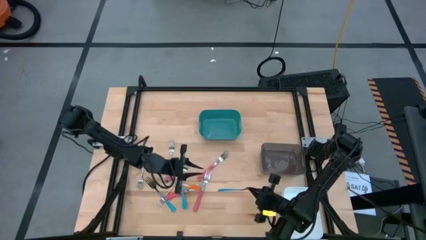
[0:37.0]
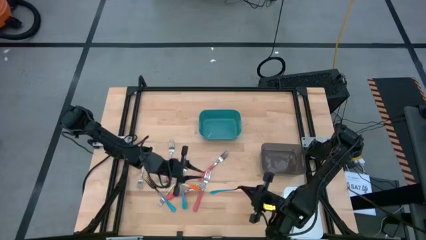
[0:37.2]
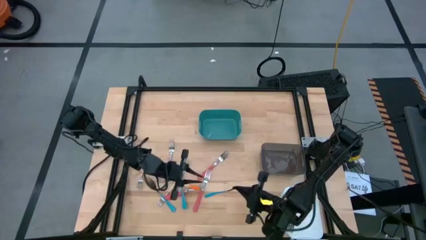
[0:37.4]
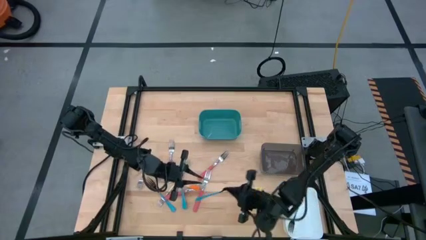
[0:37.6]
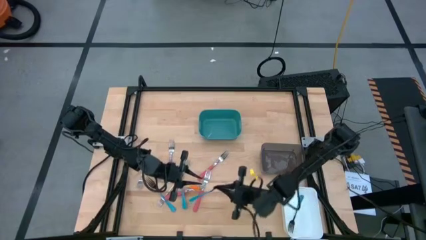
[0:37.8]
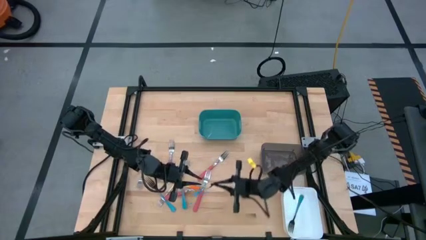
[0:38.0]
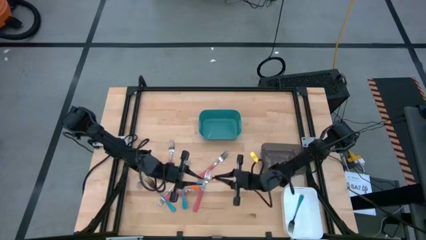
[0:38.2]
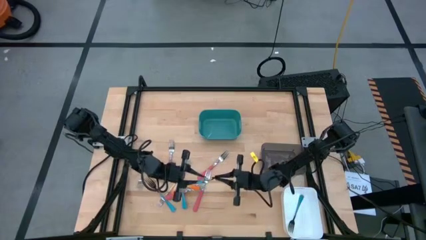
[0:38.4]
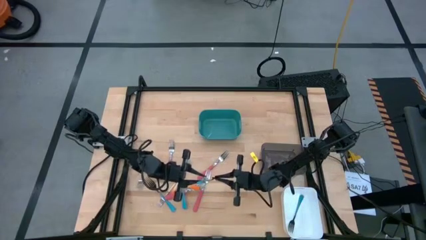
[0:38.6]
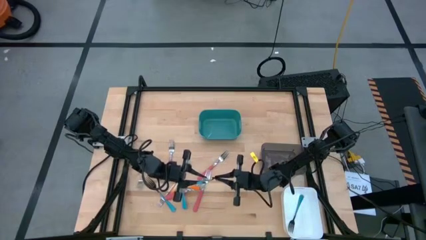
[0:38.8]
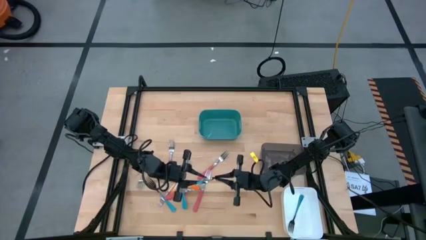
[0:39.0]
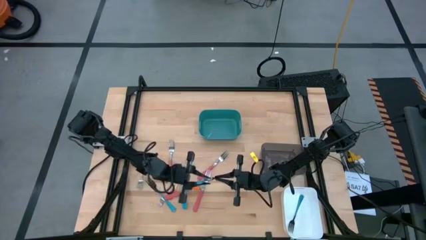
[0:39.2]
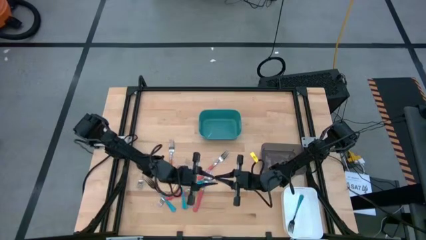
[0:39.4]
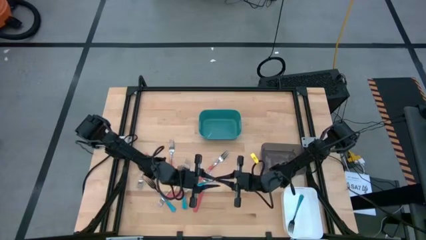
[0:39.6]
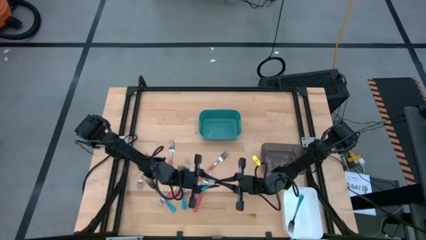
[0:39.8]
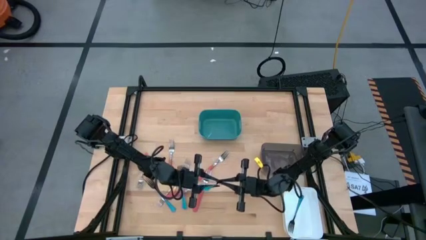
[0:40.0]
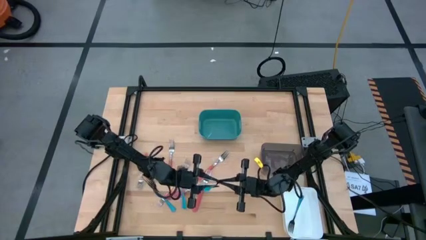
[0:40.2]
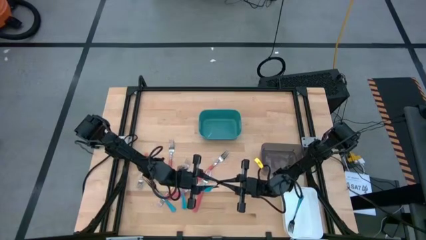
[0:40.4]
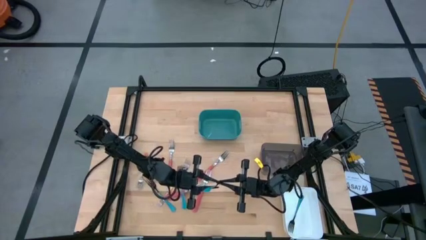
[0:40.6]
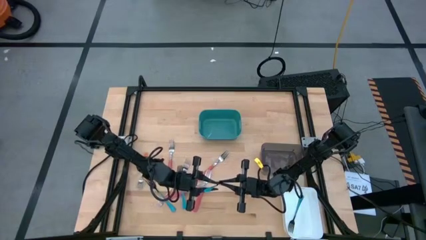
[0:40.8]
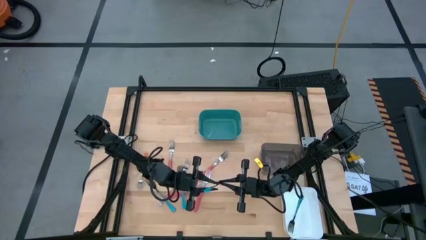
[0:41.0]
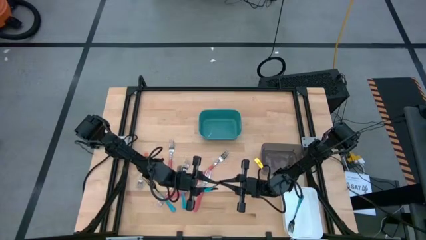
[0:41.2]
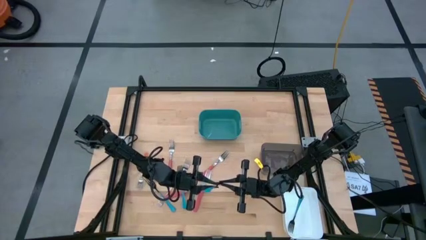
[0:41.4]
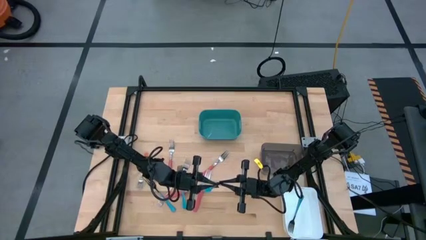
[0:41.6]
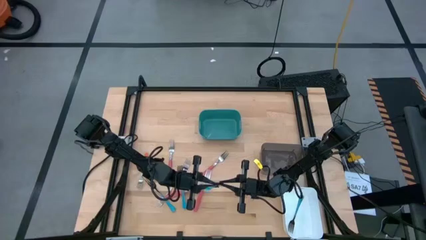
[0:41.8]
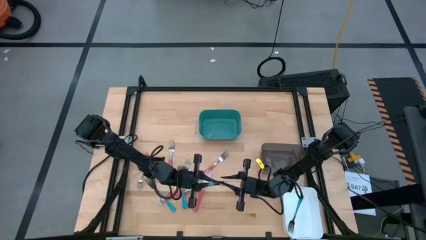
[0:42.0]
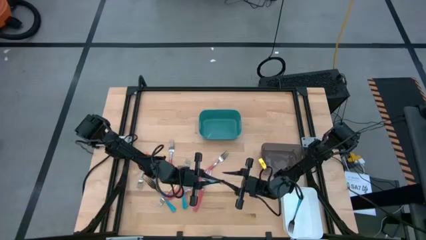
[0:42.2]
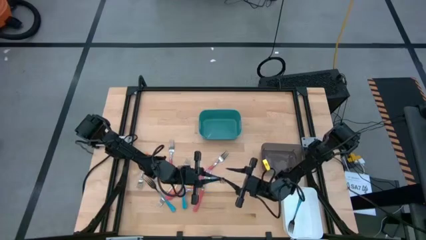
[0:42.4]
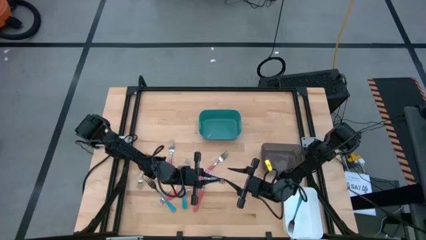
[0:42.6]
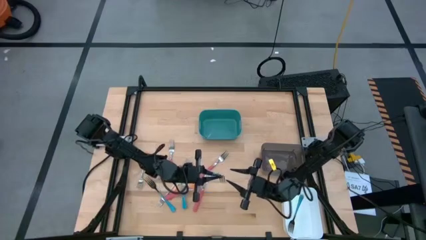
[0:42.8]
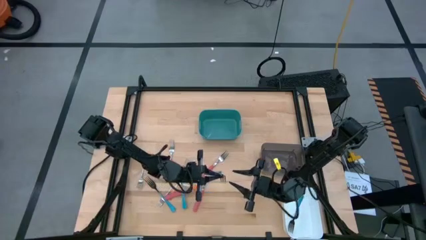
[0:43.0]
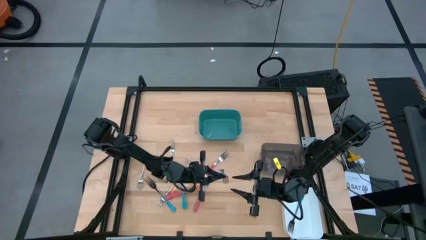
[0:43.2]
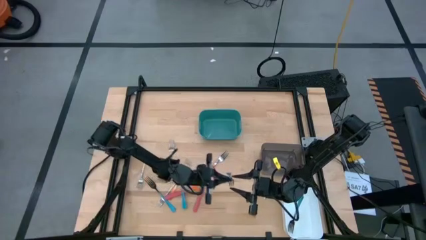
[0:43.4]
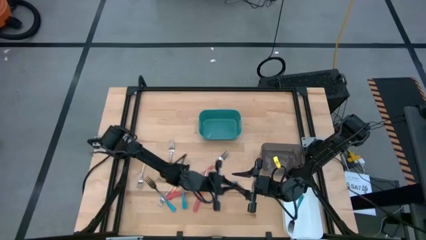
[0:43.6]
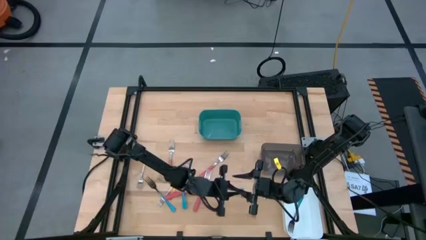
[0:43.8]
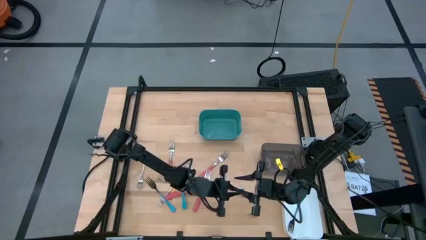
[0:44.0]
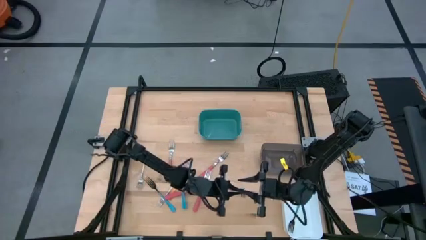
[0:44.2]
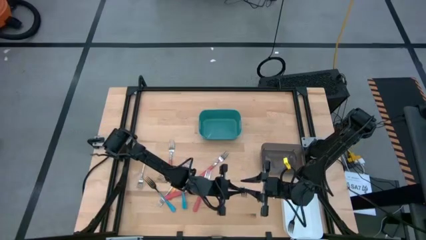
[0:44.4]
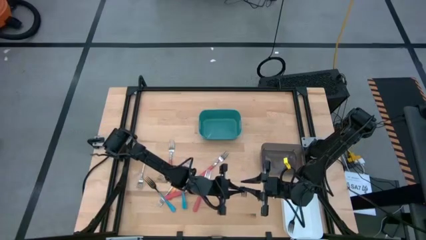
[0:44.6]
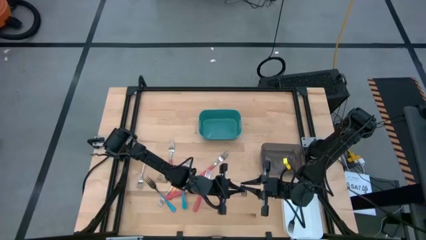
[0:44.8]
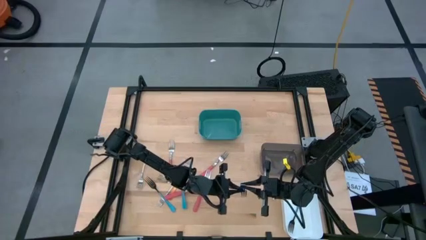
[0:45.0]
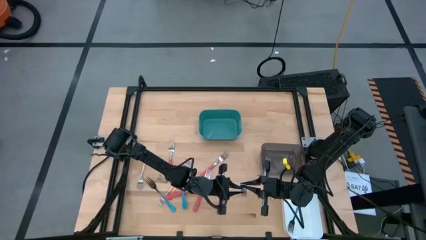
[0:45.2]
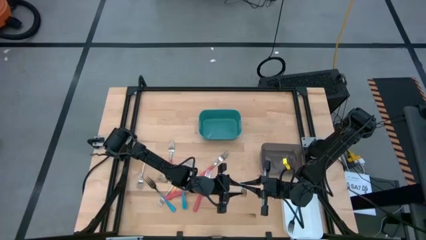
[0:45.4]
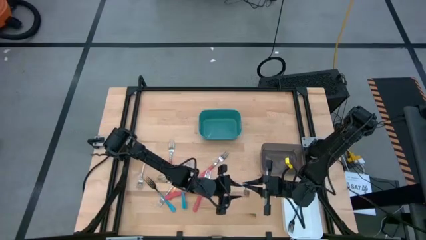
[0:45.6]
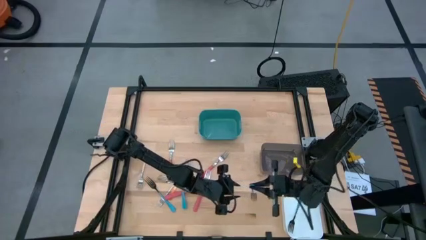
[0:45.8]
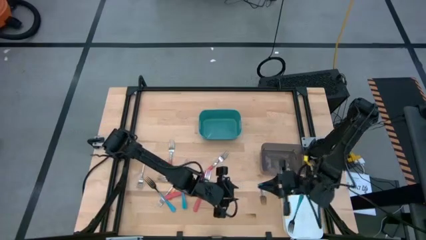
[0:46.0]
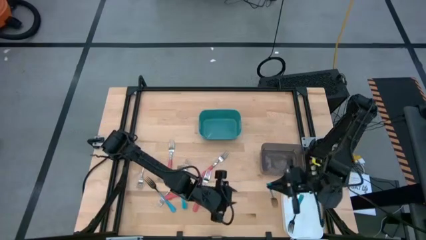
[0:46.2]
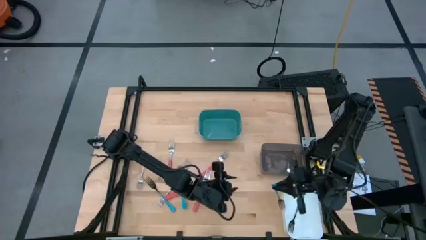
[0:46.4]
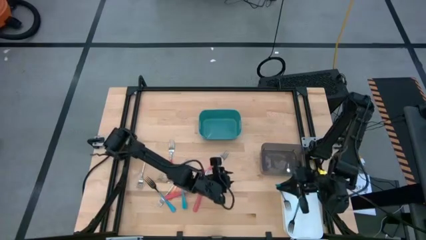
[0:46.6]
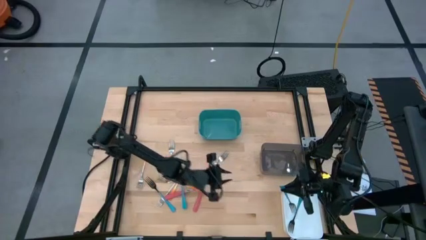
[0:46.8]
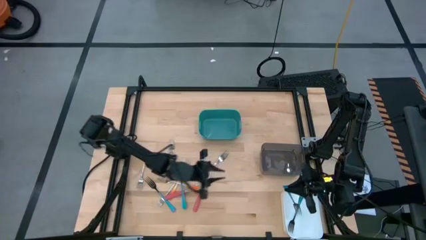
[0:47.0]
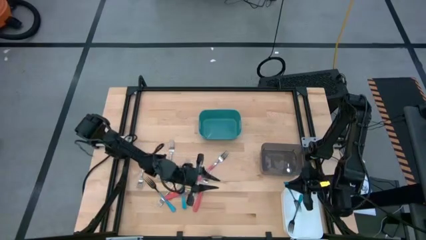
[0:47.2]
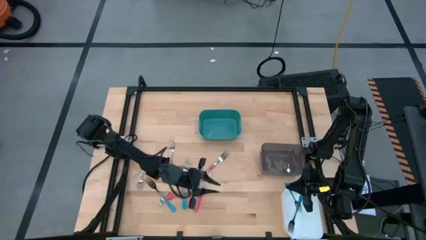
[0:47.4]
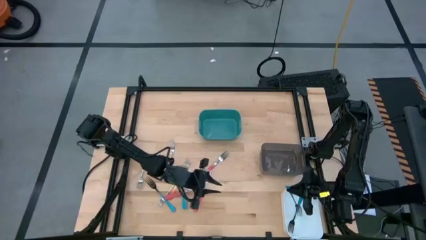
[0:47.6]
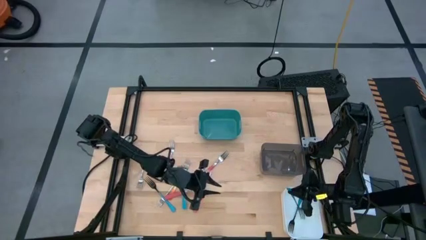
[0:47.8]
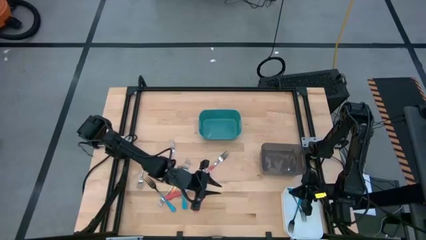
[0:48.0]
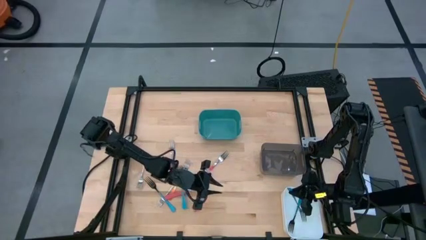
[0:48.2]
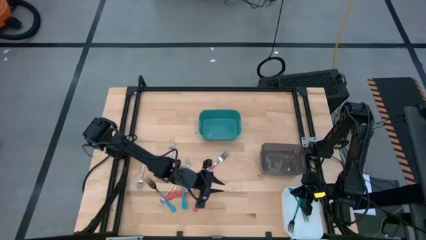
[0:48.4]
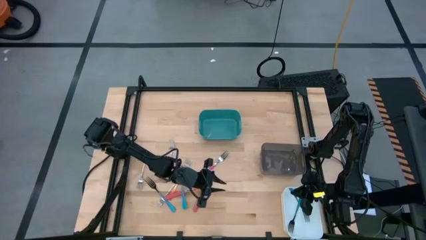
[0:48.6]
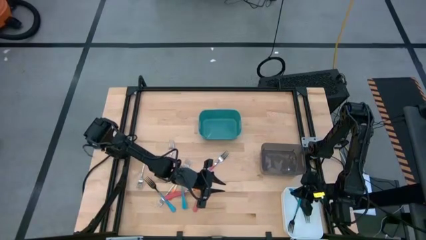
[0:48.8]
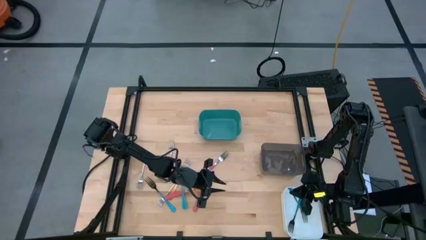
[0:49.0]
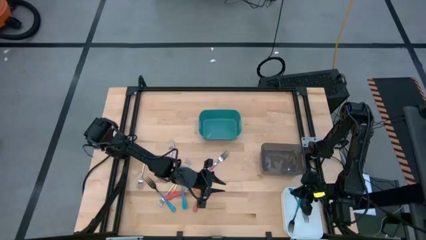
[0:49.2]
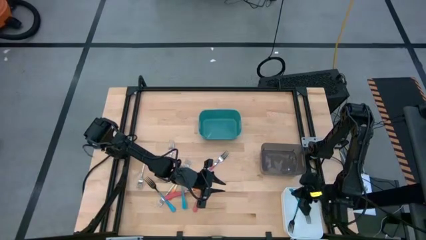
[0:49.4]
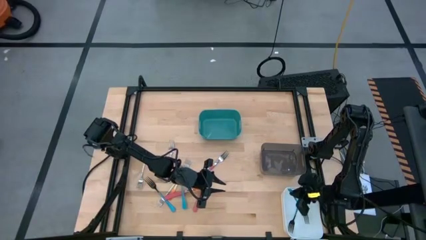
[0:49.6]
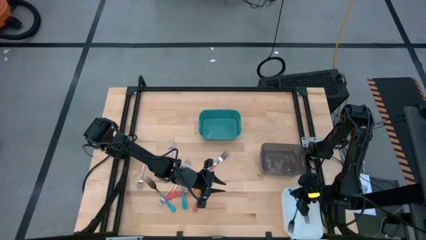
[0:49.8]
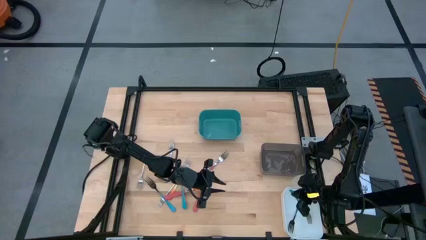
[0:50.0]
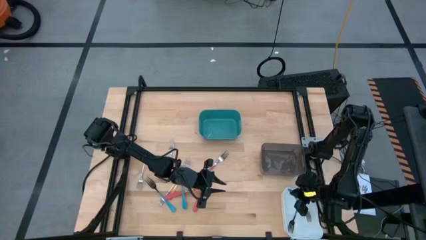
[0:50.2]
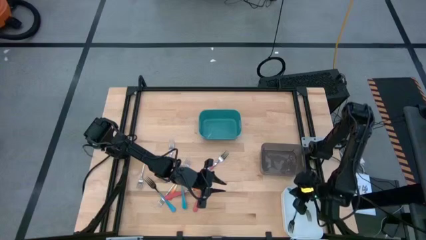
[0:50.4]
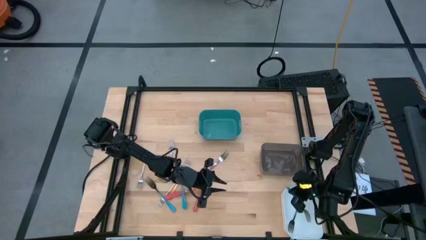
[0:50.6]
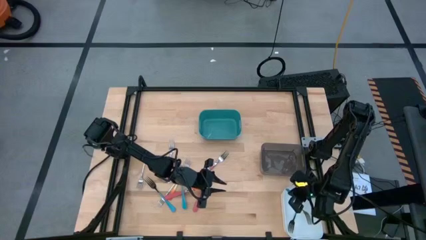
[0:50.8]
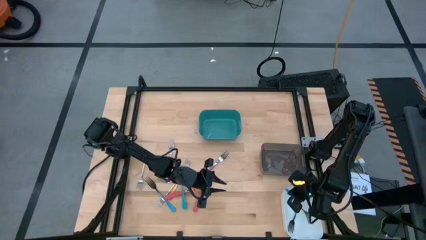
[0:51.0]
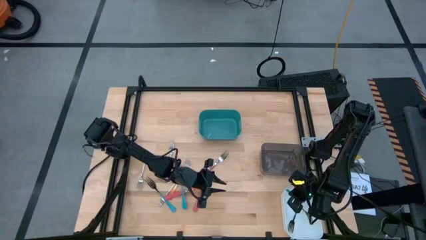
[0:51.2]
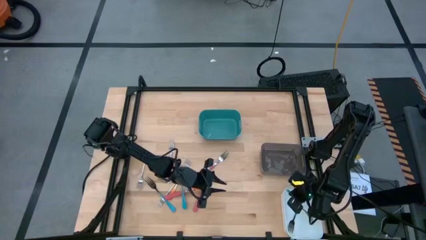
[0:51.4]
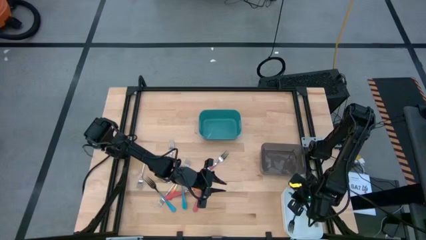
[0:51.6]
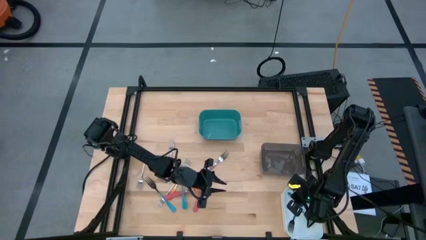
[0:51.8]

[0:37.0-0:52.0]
Task: Sort silverware by color (type)
Put the blue fork into the white bin
